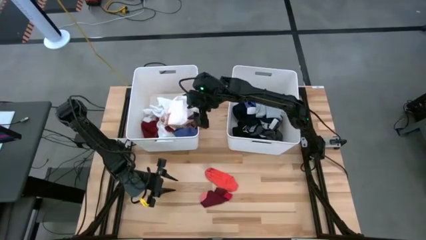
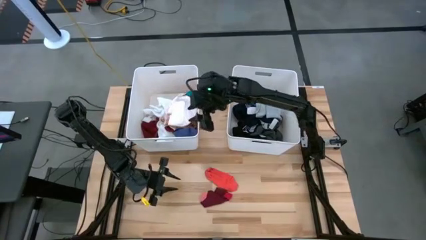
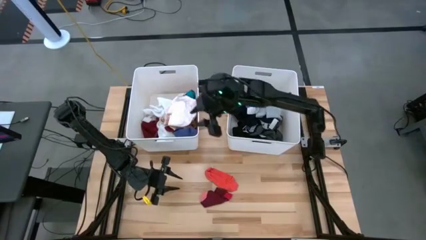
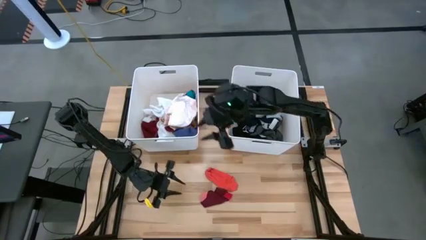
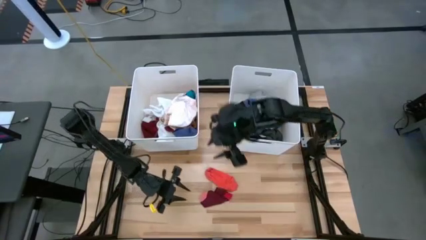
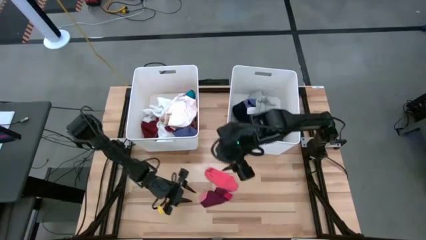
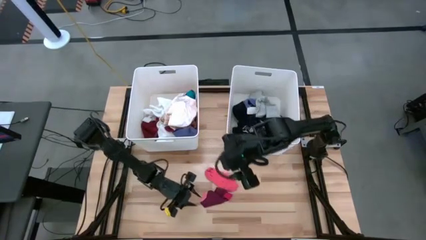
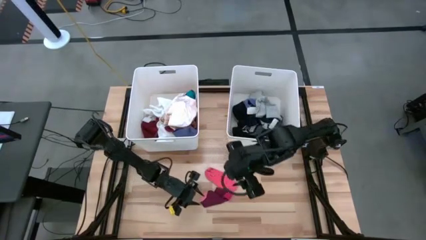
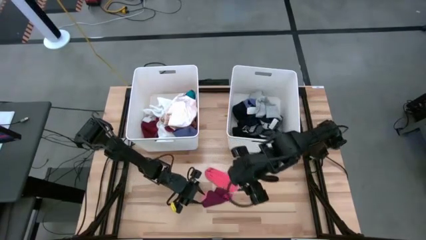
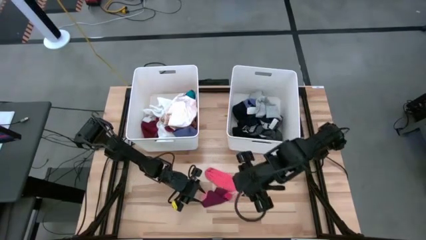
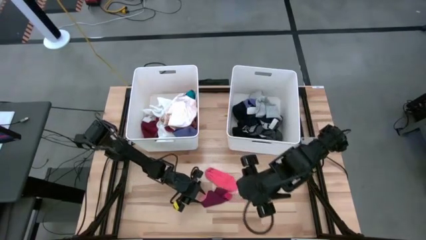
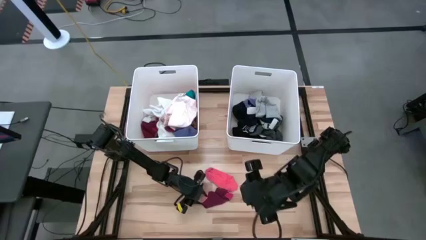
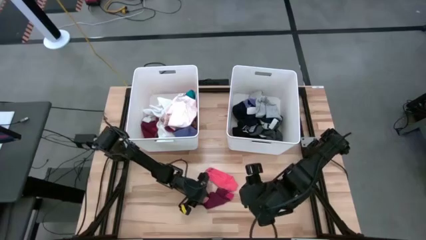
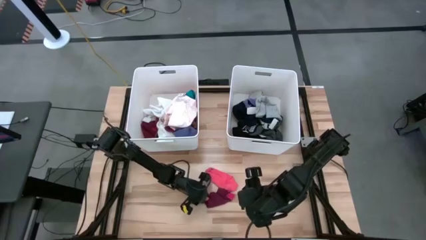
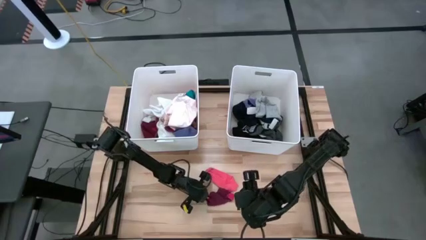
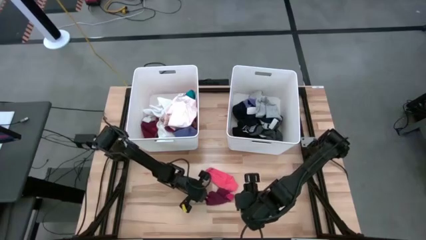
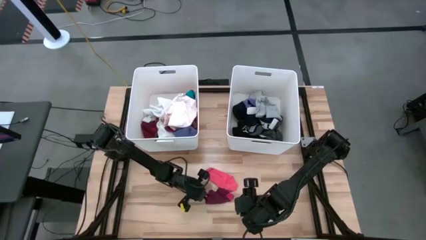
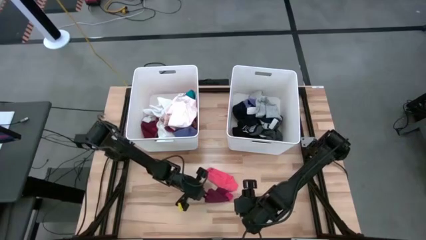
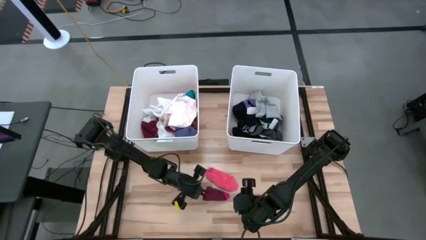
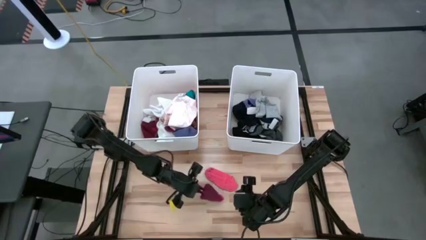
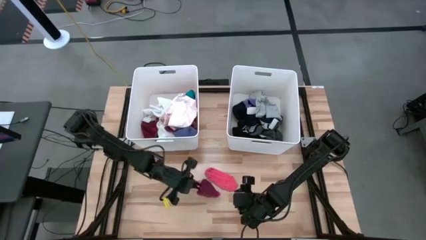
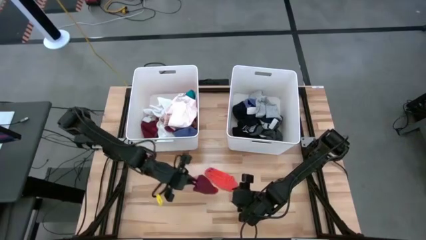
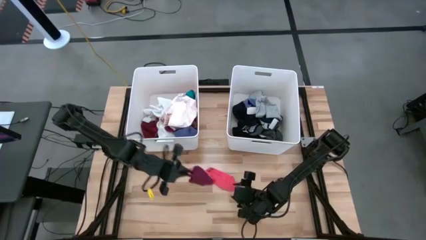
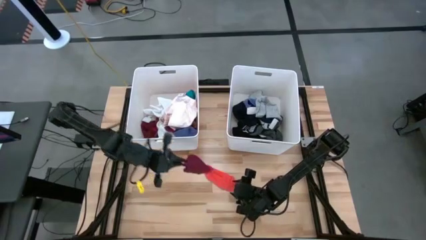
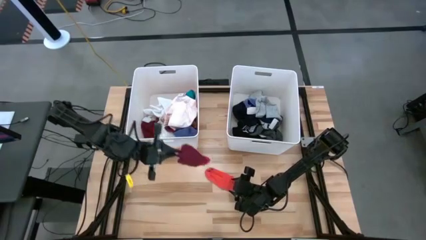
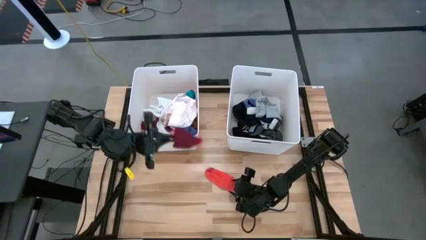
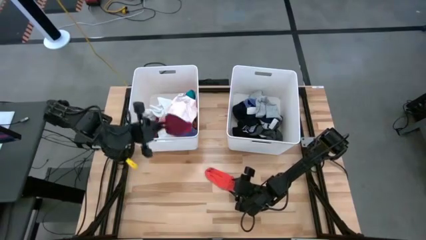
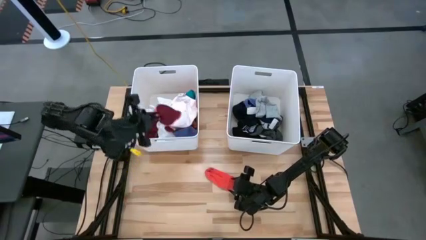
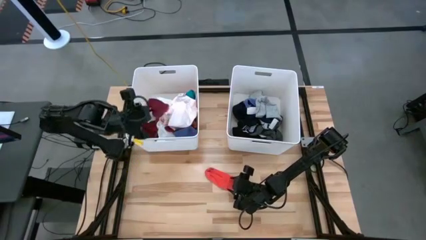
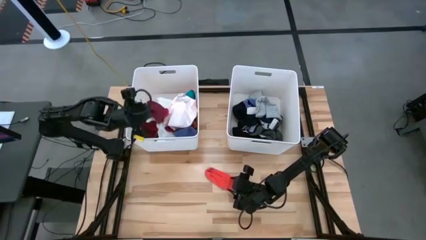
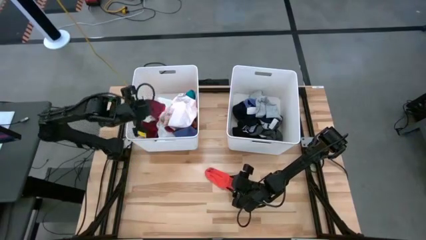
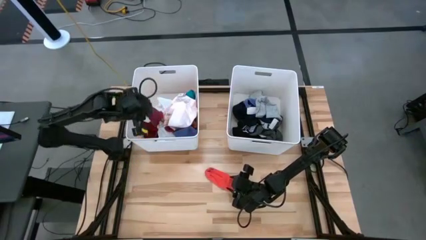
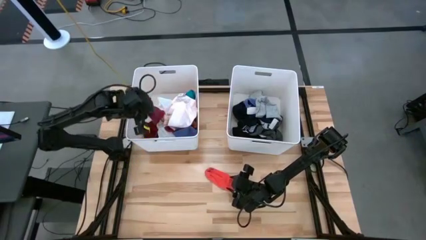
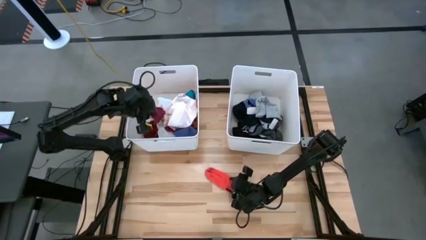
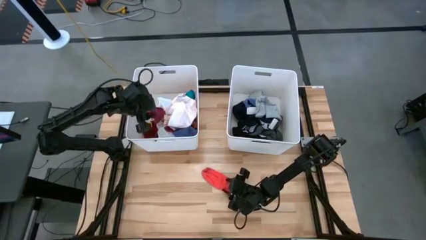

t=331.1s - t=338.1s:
Task: Sort clothes
Put the red sock into the left white bin

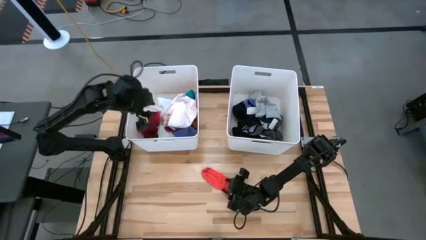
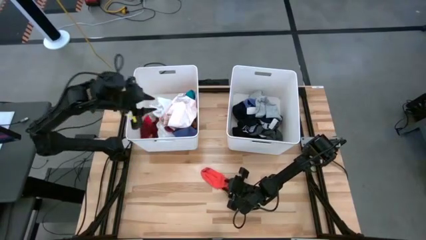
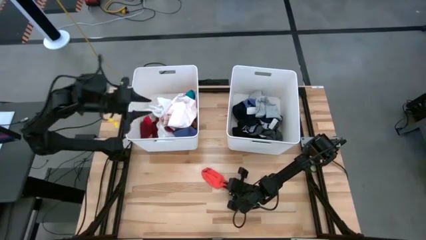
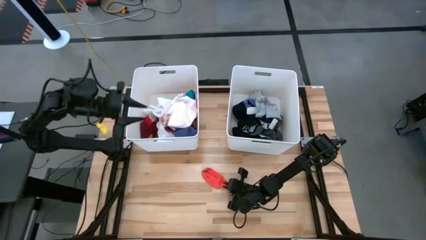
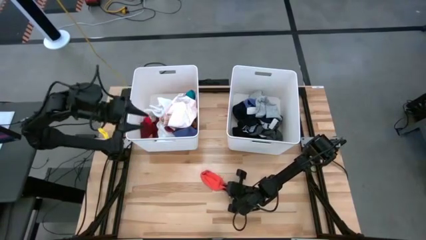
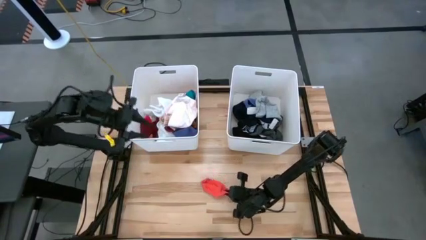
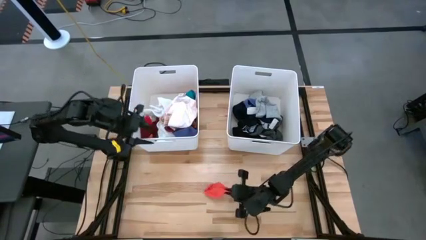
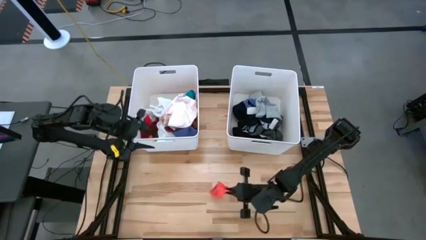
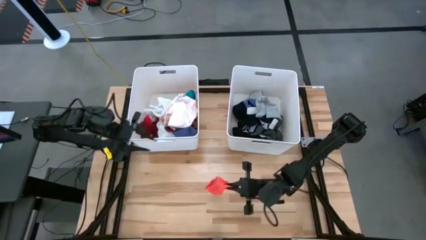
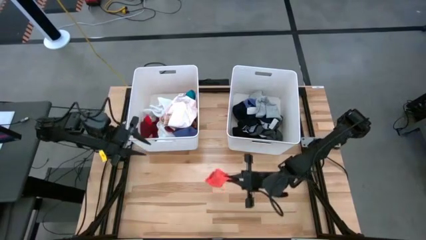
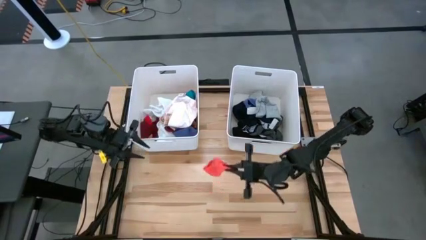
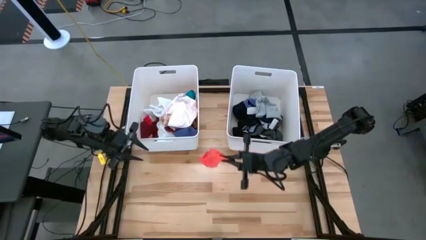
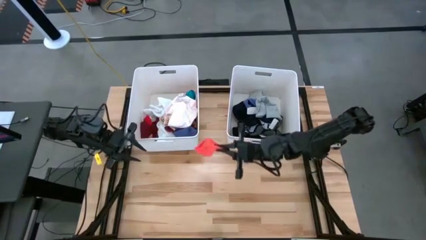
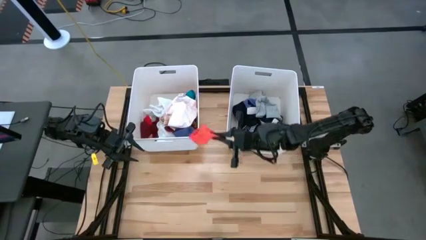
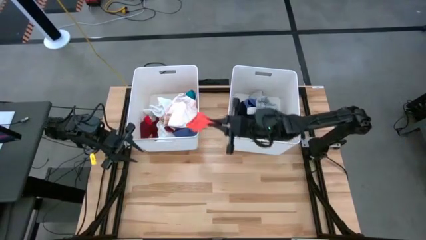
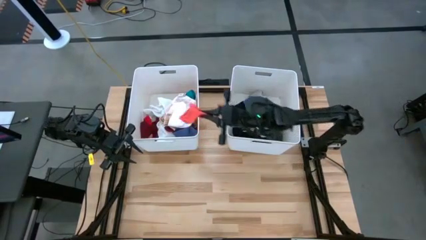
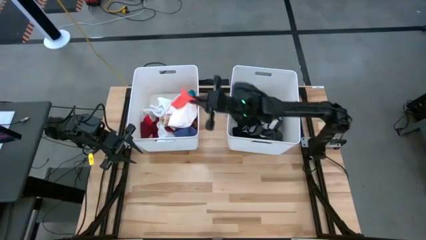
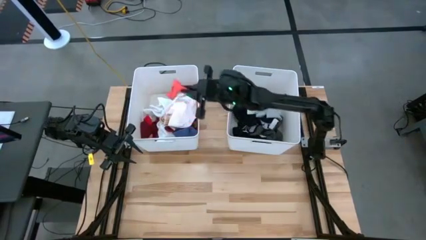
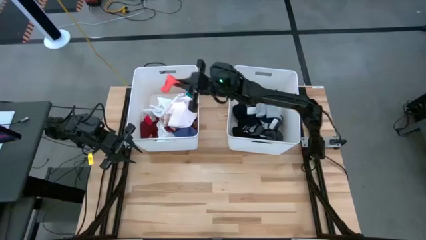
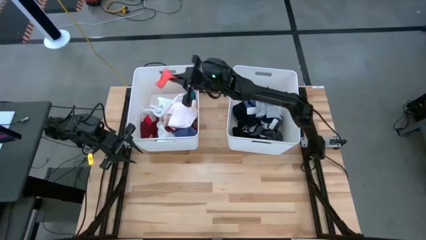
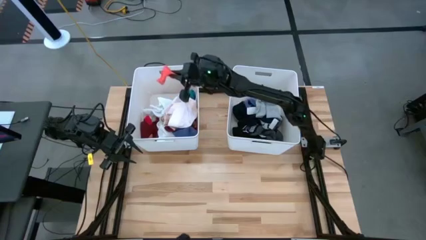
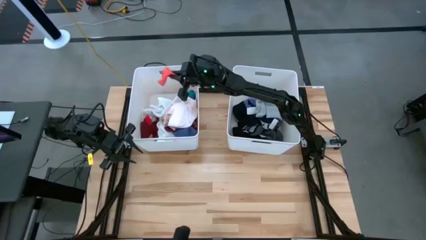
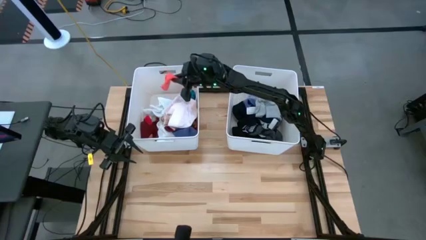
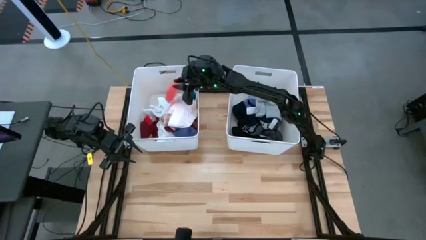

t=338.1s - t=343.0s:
Put the pink sock into the left white bin
